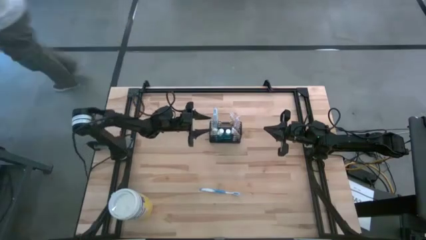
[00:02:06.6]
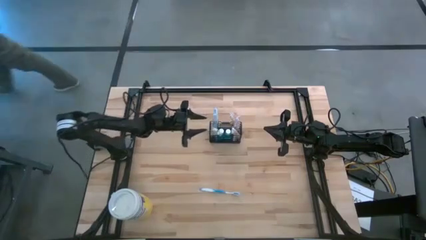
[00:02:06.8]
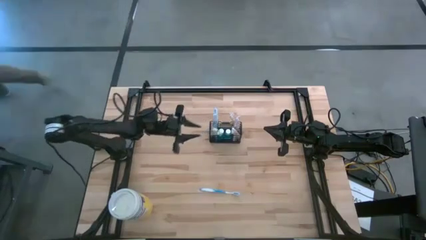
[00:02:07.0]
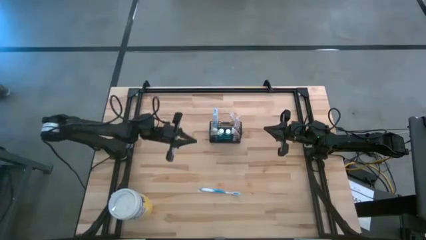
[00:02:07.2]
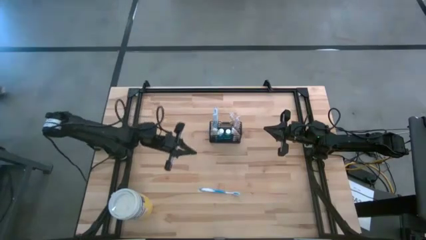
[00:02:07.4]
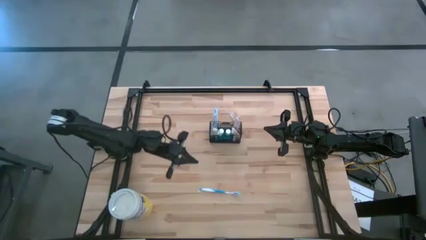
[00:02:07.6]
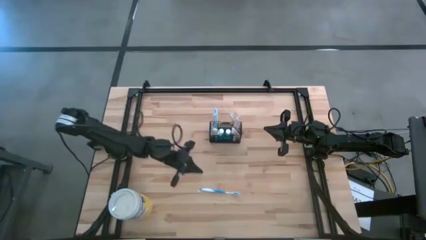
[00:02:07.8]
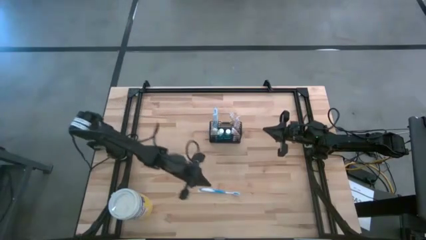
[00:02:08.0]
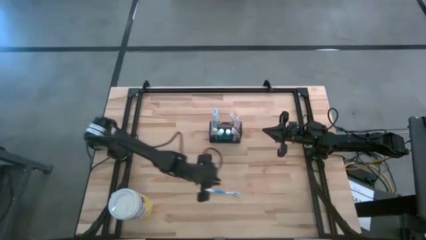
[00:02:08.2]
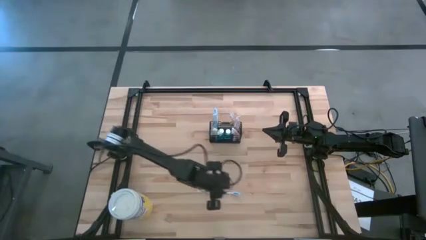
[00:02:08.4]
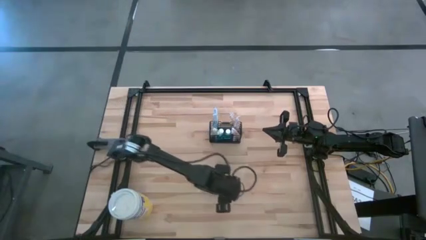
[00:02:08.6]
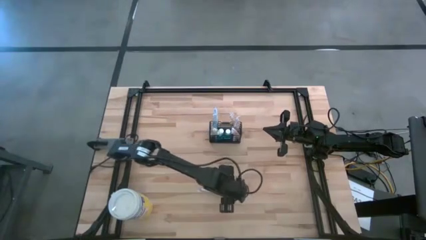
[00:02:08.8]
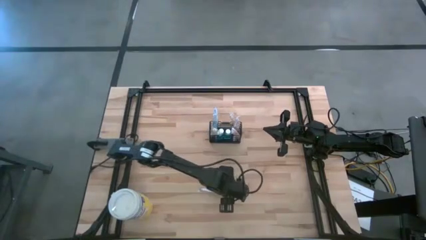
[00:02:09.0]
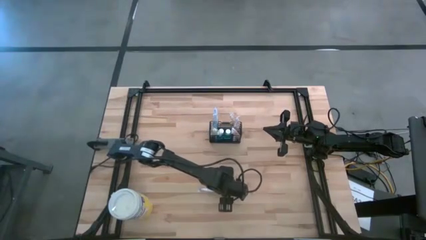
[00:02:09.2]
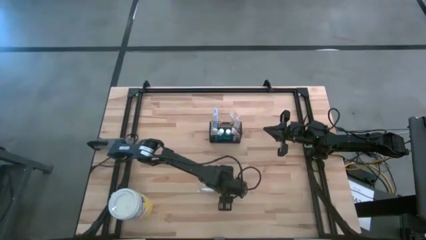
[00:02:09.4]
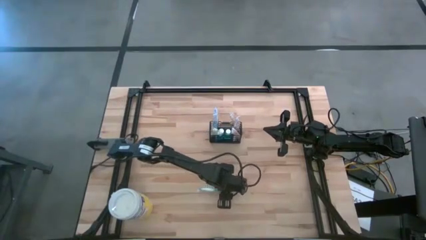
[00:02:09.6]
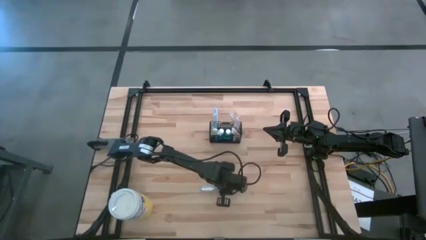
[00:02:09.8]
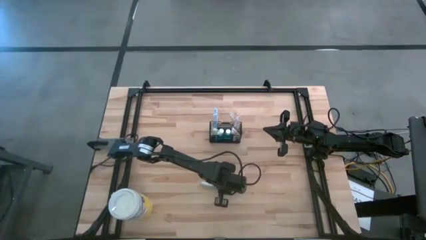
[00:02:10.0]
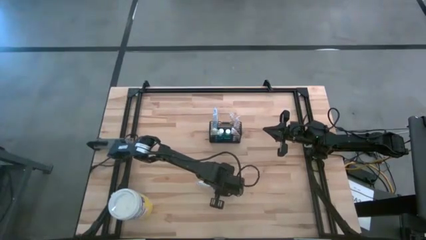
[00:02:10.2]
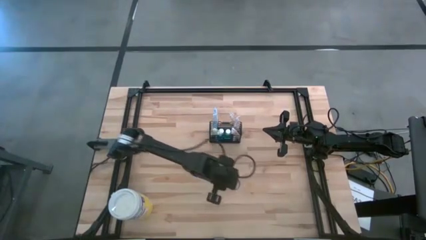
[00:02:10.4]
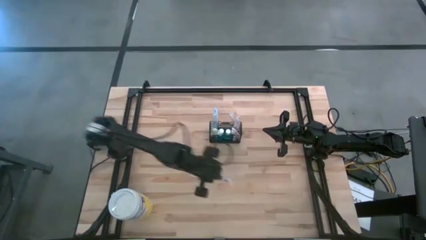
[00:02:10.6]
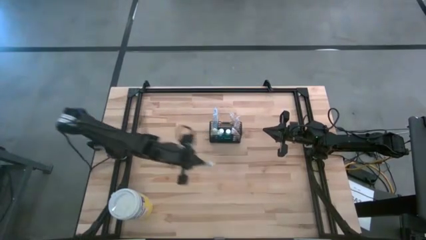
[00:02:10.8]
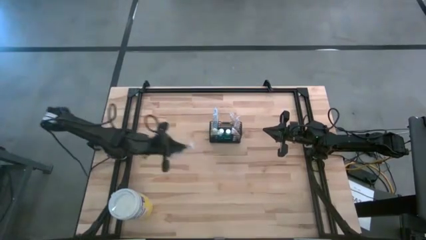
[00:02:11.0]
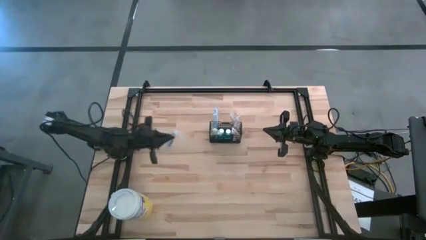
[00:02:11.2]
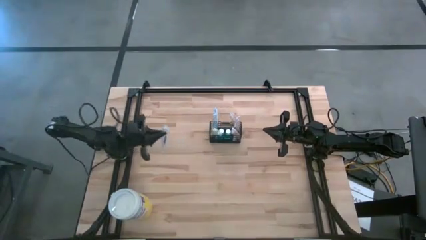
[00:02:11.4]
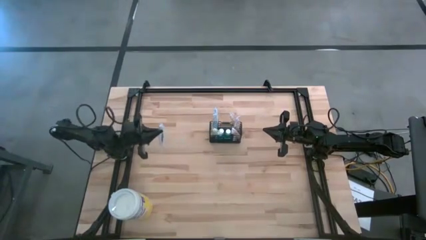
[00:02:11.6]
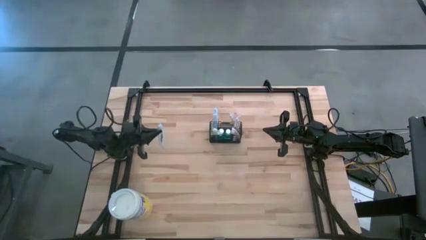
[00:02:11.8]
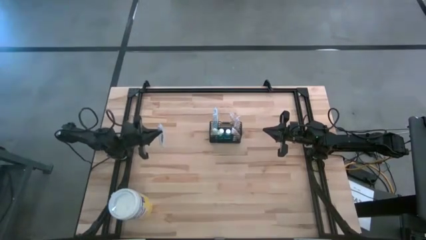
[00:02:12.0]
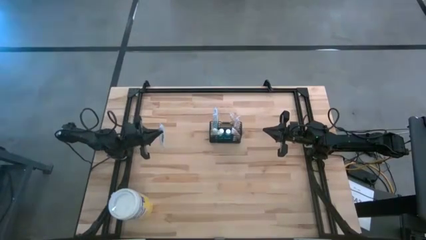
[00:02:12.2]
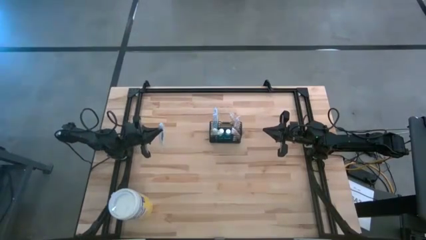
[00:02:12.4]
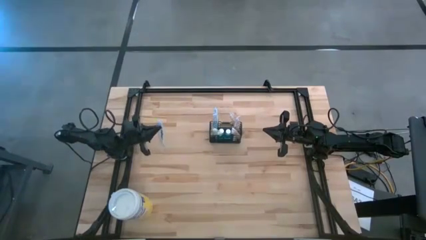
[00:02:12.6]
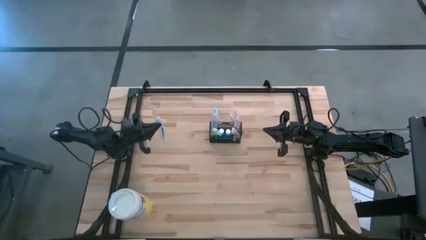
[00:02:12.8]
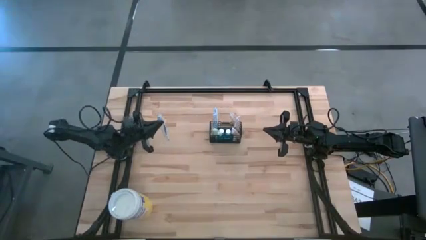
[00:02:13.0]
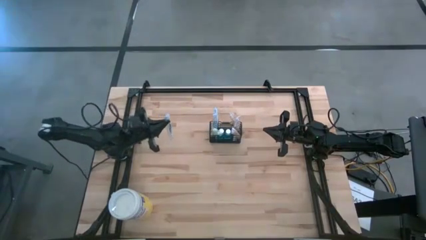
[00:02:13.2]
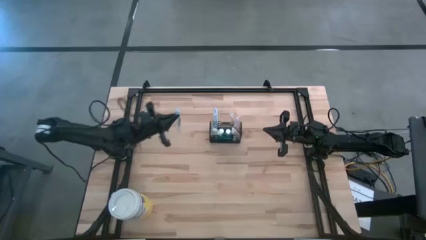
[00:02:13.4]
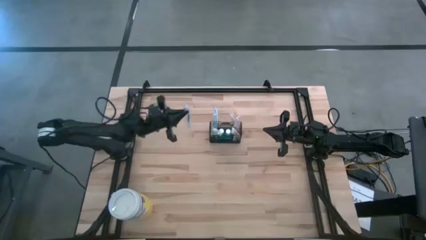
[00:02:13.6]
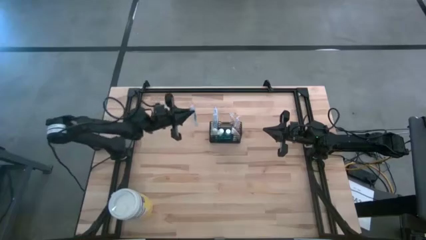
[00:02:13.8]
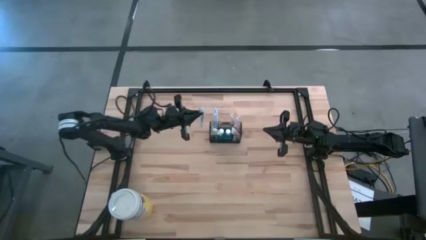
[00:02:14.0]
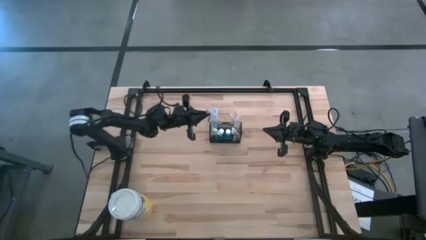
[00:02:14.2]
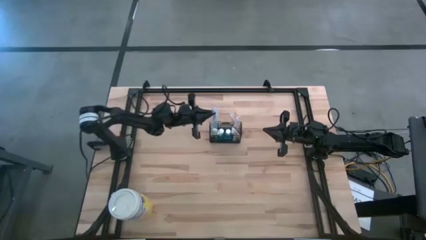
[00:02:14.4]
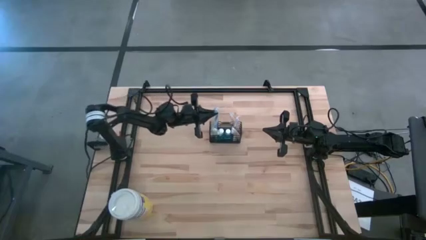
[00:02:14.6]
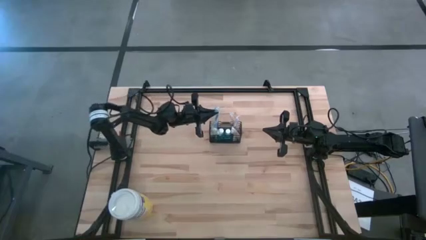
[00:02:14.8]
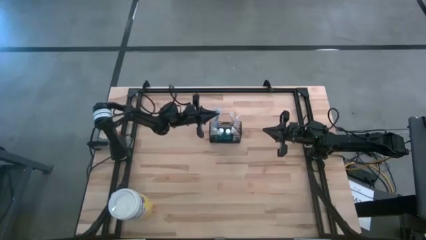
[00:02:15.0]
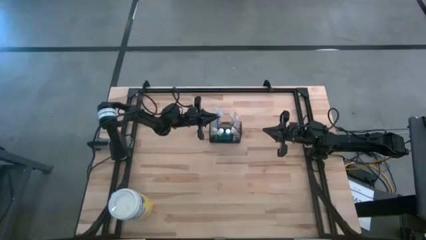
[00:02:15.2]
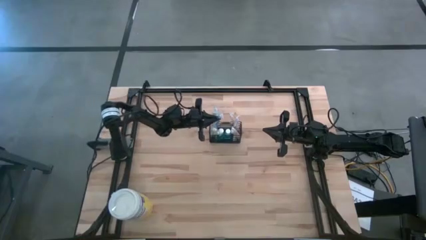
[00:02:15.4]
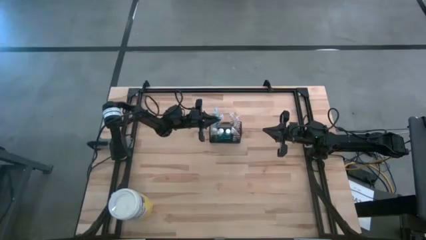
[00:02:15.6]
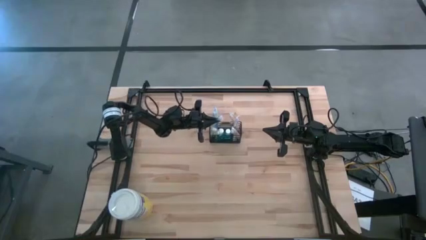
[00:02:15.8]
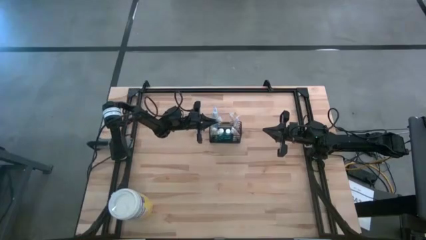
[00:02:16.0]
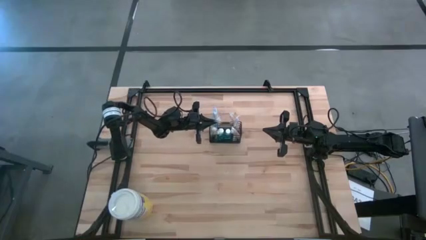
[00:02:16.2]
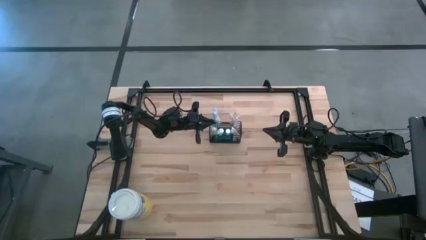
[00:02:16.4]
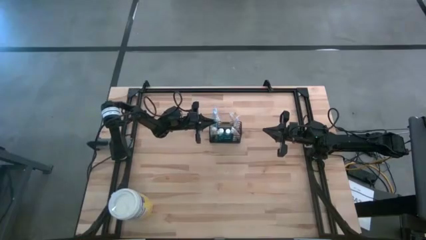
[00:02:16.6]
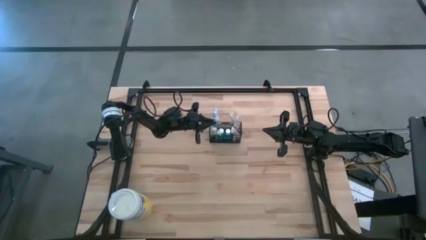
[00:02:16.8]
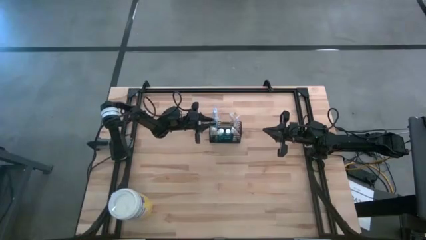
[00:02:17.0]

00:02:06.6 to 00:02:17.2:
Task: Pick & Place toothbrushing station
Put the blue toothbrush into the wire organizer

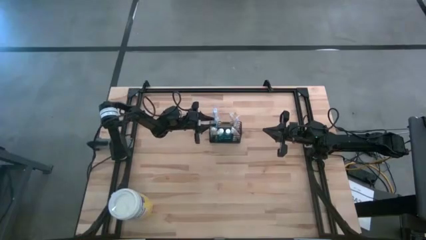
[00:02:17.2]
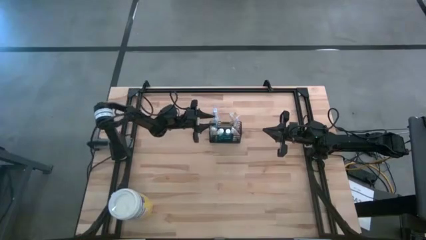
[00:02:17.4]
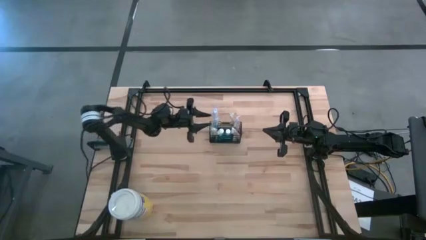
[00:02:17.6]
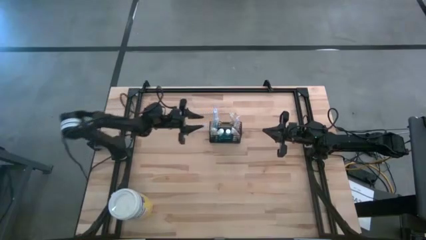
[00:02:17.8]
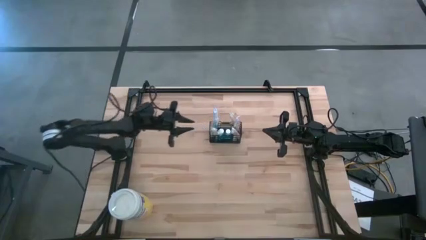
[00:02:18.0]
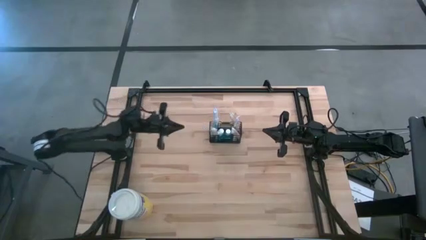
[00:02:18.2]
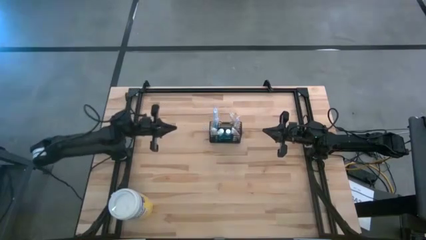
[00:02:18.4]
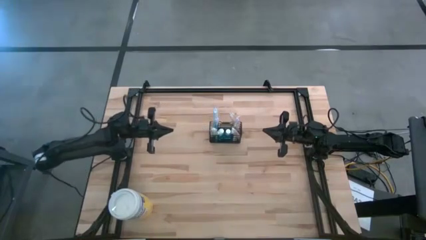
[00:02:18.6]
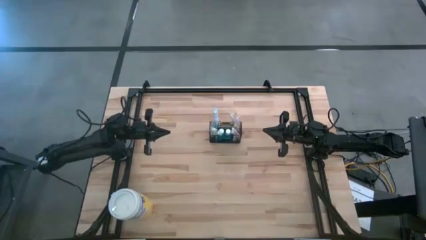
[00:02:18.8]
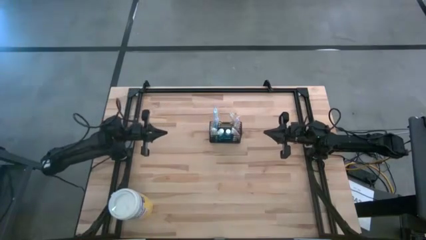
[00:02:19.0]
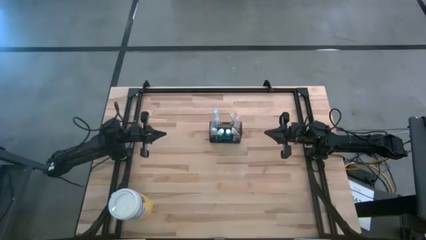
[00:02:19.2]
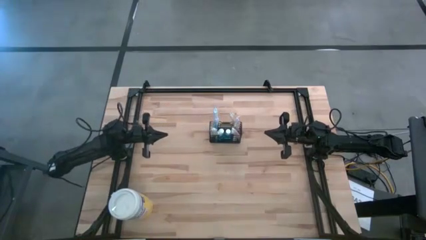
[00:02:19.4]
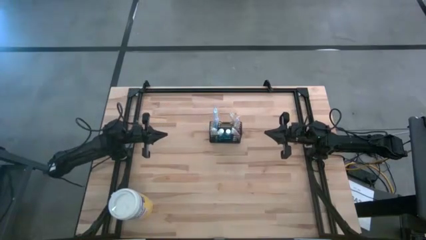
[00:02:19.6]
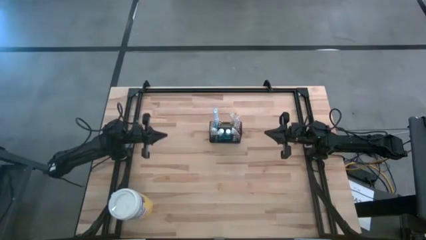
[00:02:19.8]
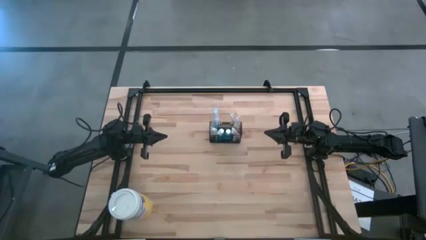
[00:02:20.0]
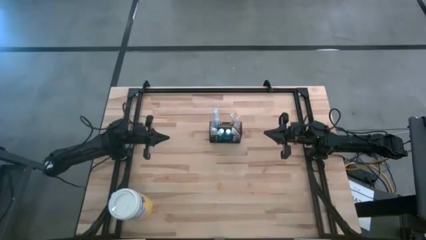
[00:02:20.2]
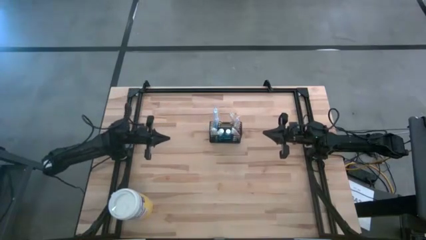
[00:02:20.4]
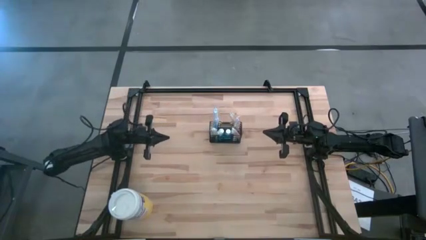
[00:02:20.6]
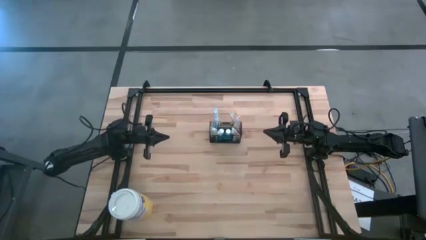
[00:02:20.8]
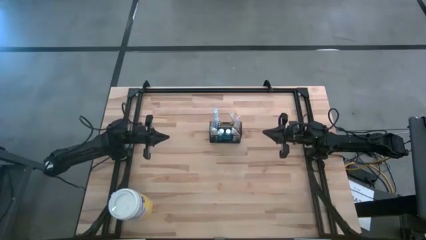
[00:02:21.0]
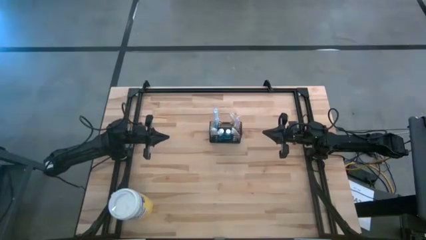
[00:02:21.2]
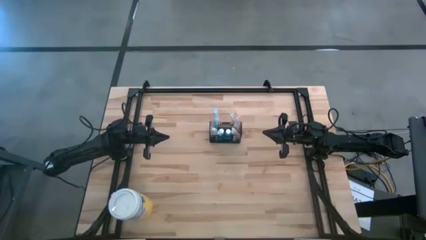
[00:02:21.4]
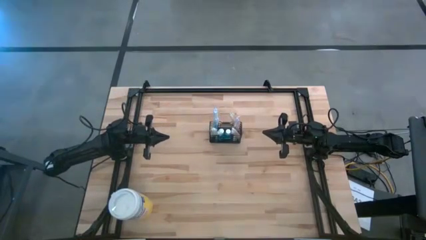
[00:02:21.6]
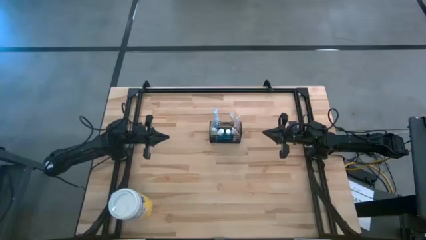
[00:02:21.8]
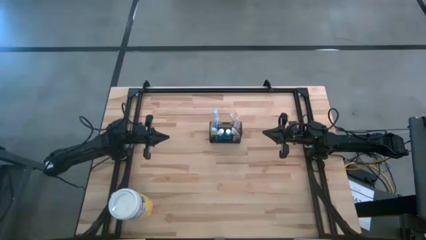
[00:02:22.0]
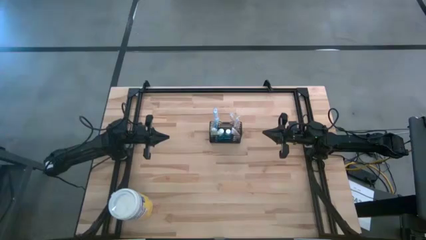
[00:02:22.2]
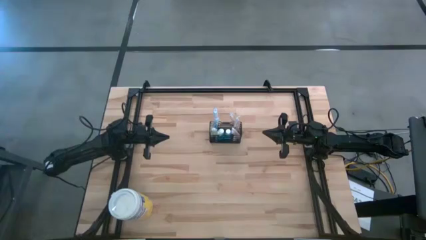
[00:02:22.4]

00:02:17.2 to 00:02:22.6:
Return to Home Position
